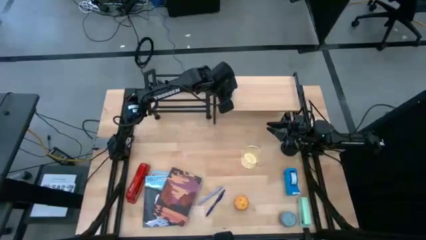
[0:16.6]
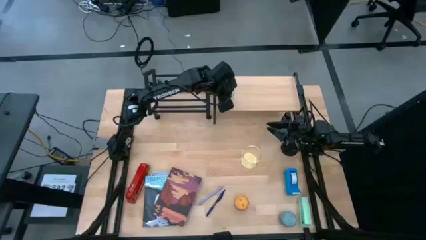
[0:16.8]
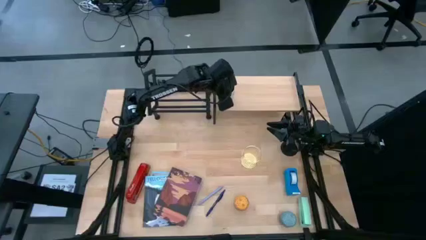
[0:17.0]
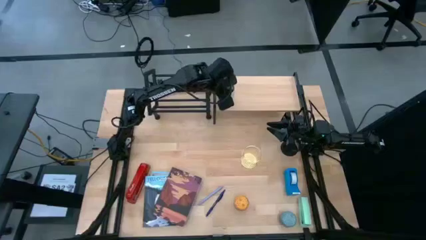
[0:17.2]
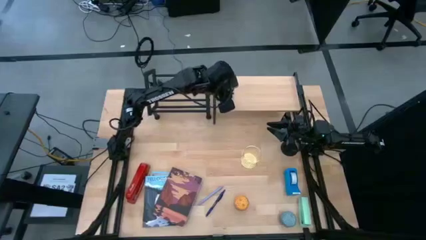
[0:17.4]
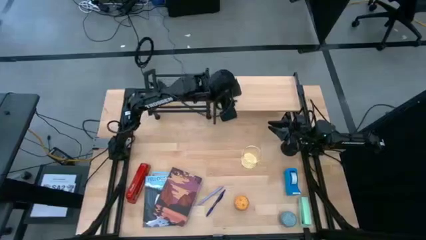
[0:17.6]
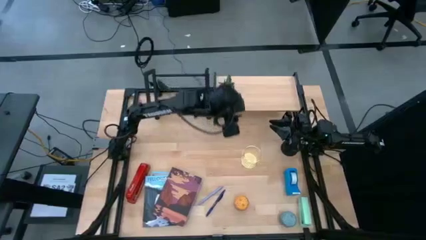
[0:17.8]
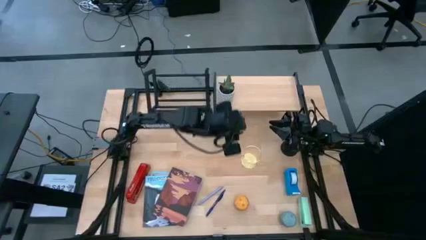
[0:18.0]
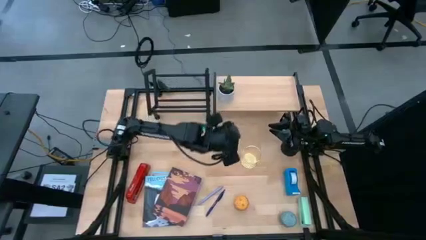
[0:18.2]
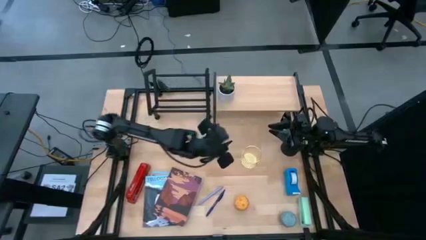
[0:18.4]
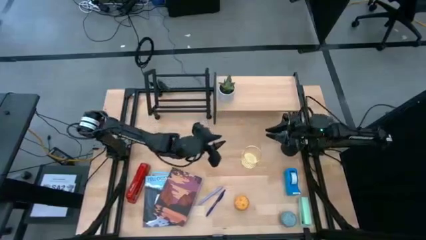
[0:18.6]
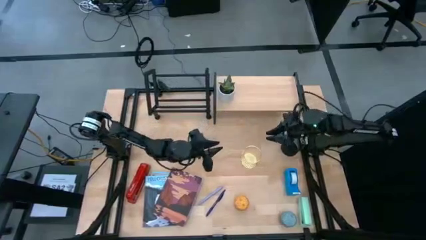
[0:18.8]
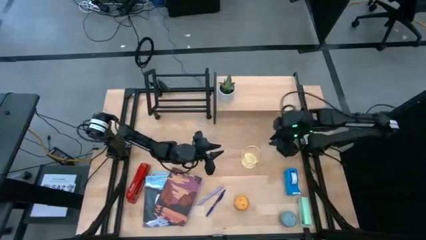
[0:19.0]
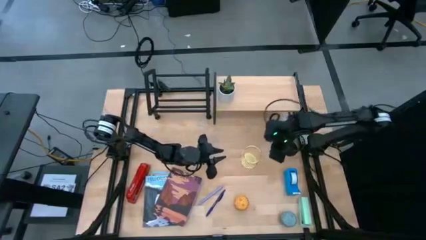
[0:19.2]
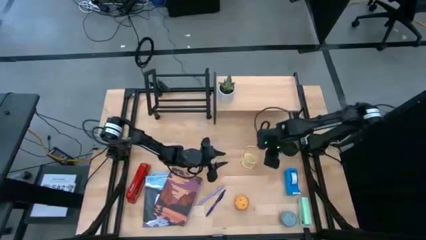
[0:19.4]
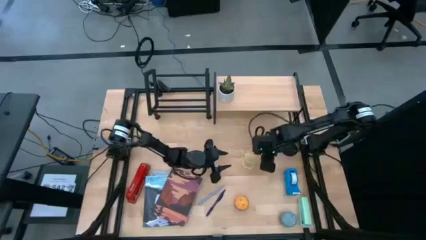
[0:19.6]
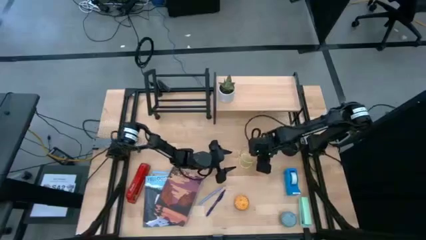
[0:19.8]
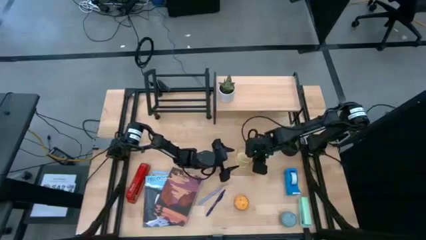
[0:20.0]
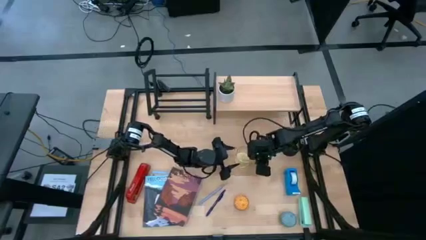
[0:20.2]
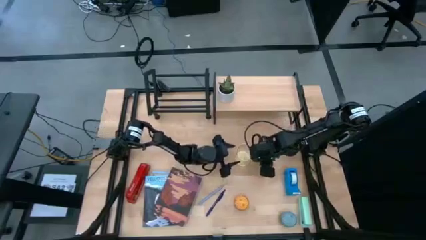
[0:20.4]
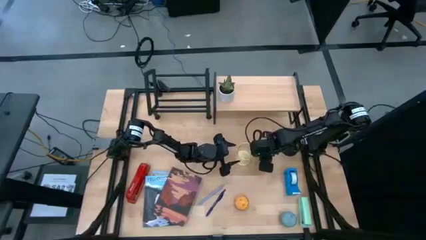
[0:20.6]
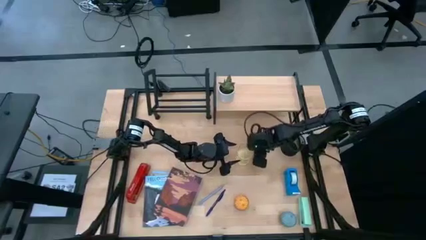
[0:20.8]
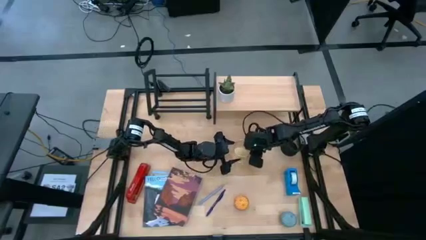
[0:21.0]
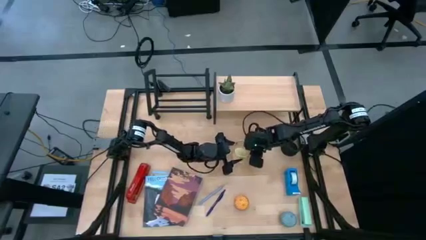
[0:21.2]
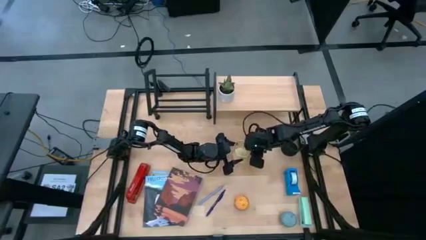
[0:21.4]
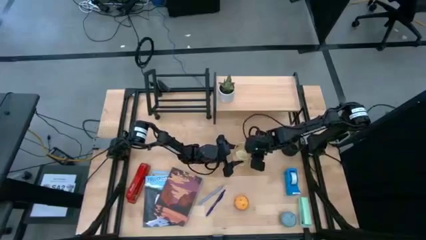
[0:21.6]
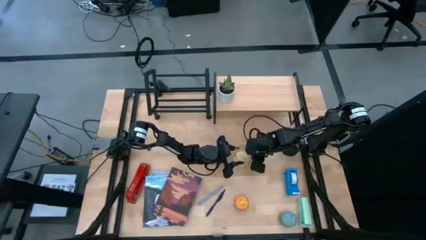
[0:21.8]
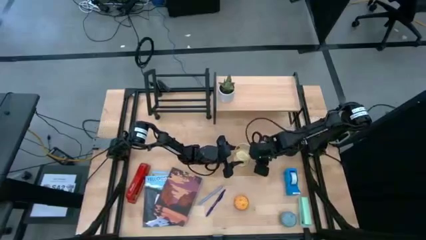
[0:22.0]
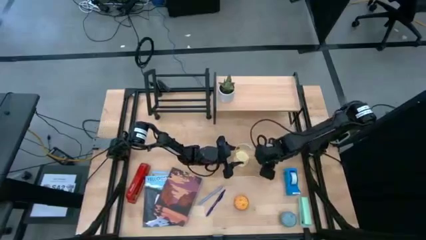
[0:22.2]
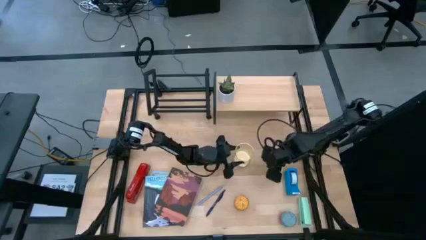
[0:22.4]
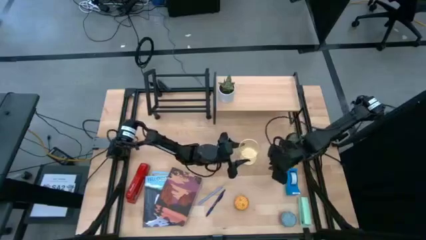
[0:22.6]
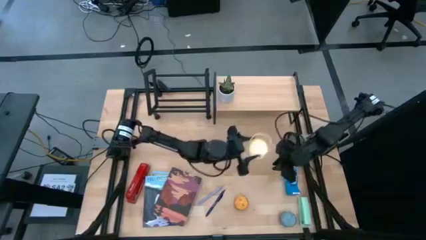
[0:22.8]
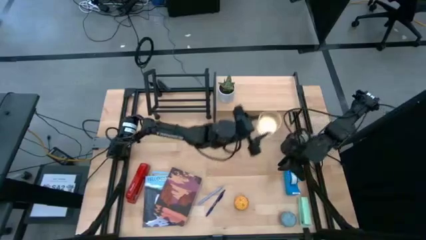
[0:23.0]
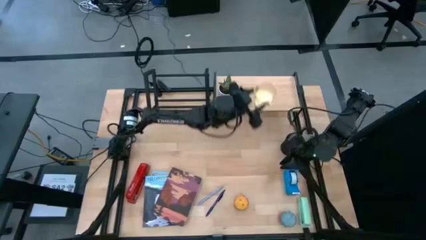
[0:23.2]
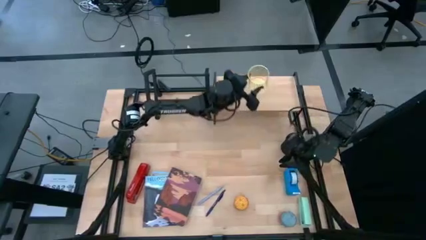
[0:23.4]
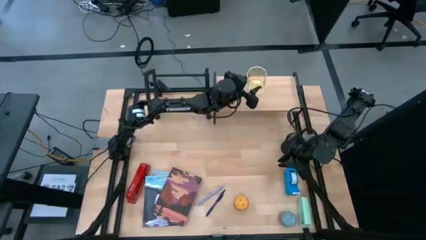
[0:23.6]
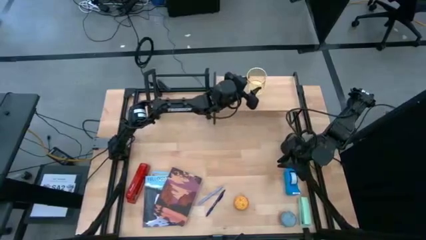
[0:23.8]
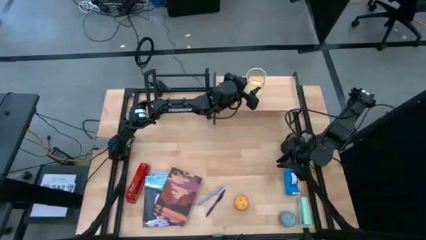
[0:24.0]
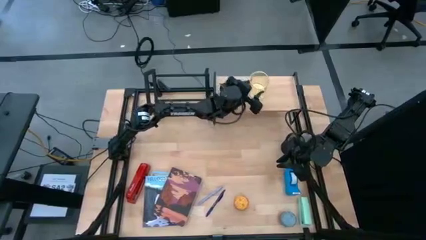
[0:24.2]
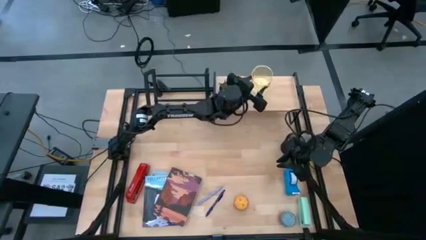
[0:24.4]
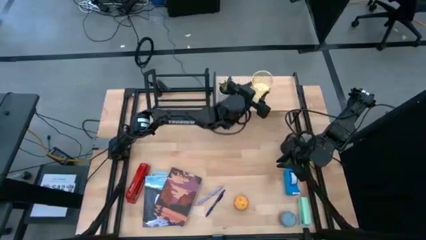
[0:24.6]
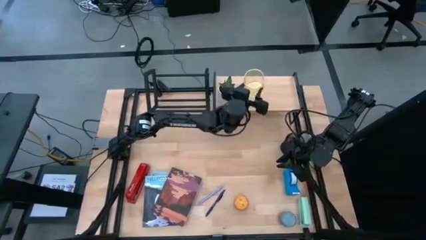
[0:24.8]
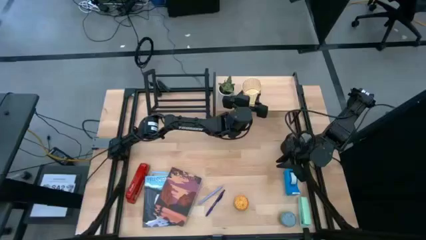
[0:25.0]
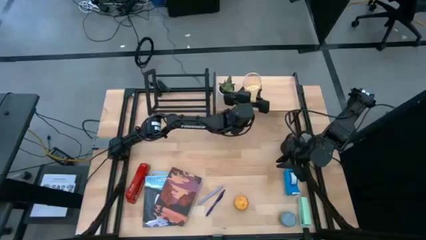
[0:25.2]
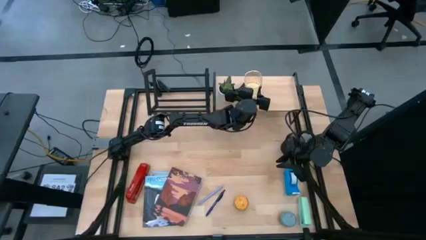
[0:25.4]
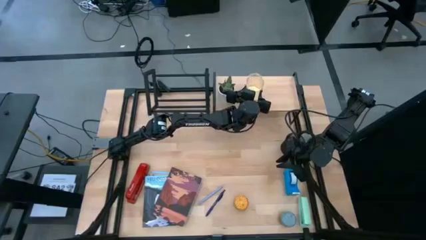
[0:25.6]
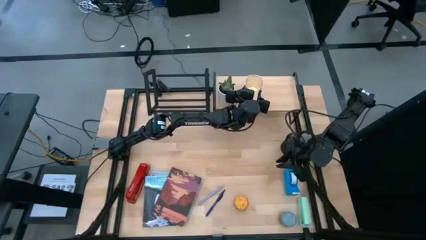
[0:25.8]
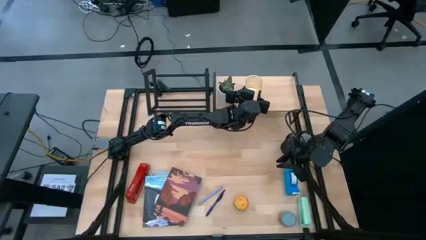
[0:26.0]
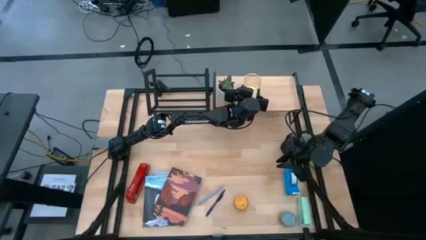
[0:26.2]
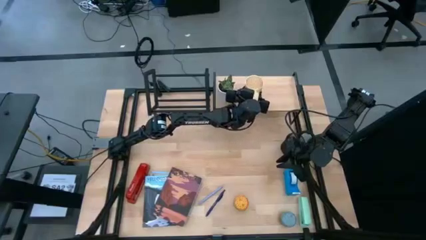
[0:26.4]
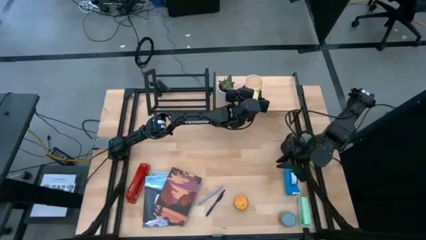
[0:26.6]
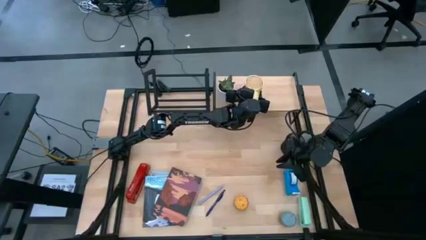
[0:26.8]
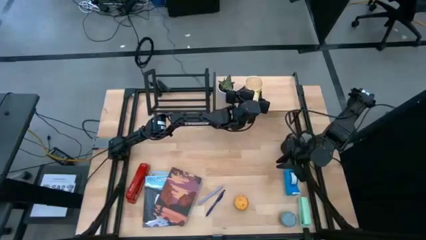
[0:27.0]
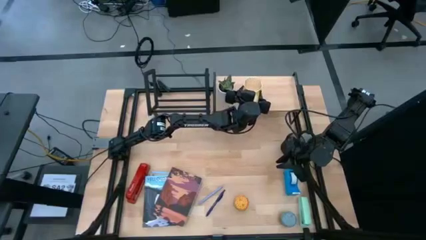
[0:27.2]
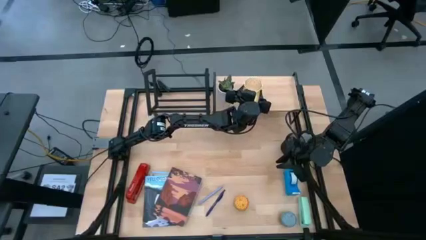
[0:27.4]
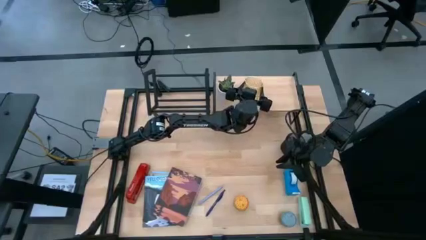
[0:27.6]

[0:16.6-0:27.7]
Task: Stock shelves
Put the yellow pen organizer on the shelf

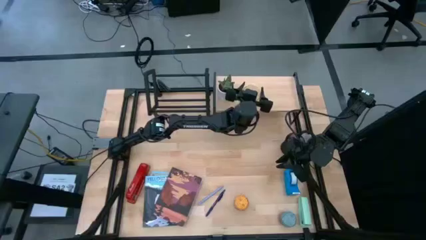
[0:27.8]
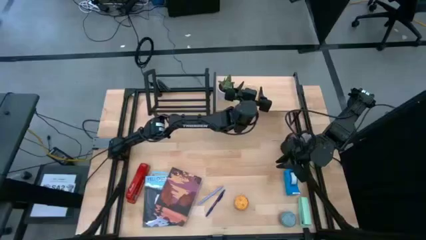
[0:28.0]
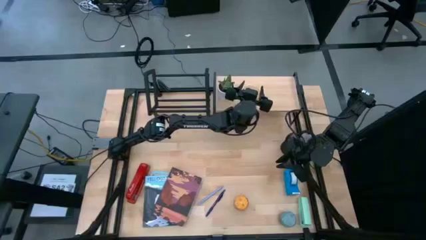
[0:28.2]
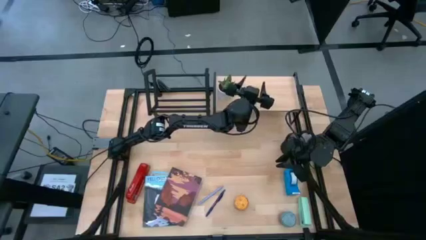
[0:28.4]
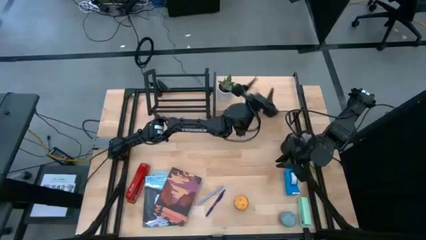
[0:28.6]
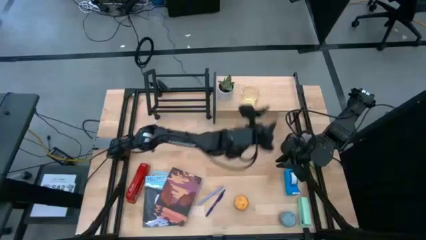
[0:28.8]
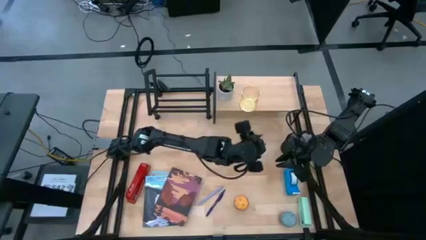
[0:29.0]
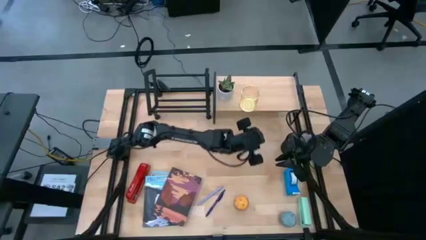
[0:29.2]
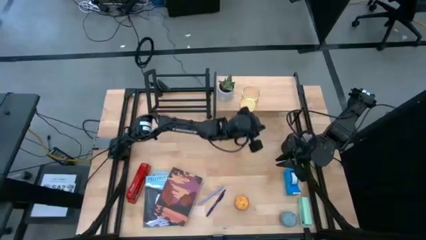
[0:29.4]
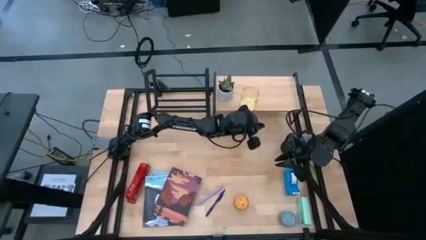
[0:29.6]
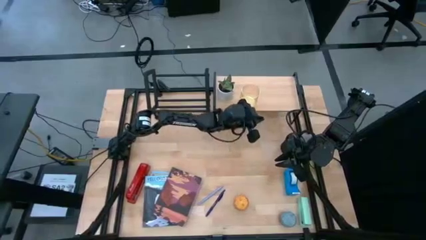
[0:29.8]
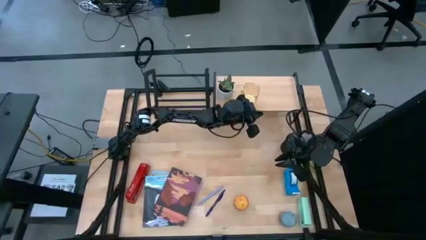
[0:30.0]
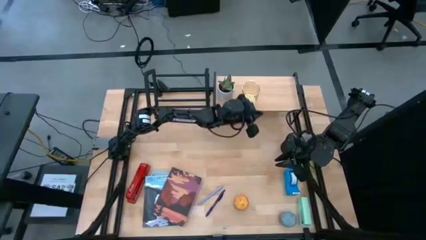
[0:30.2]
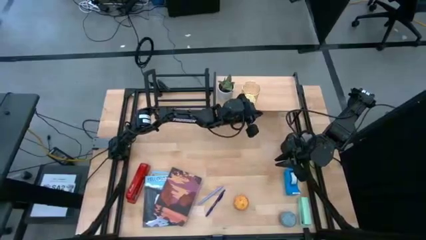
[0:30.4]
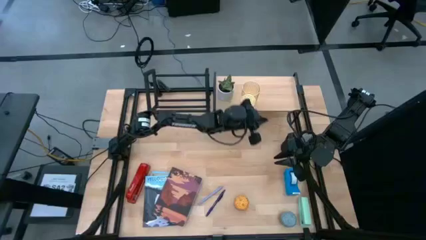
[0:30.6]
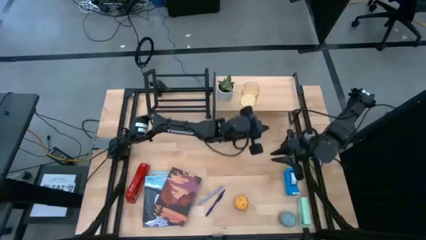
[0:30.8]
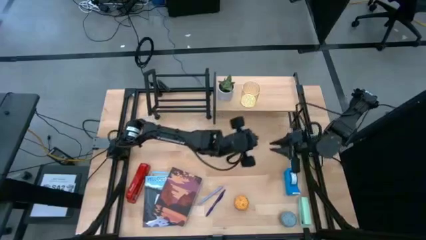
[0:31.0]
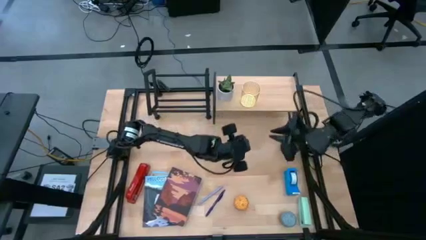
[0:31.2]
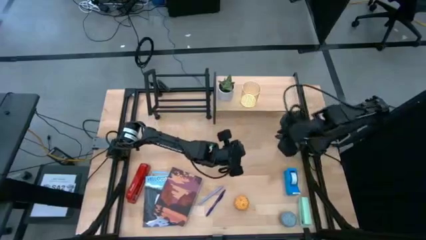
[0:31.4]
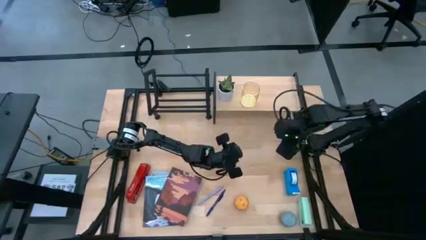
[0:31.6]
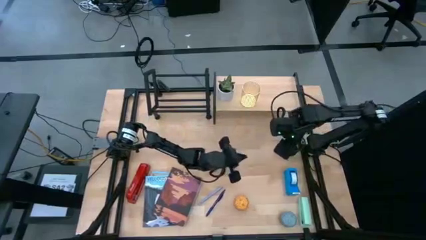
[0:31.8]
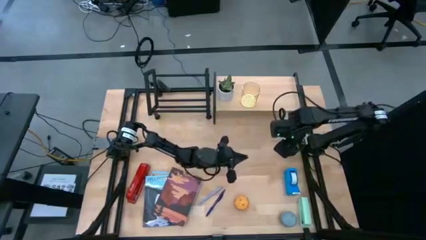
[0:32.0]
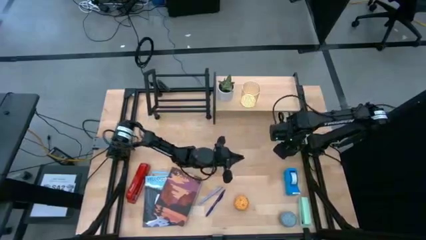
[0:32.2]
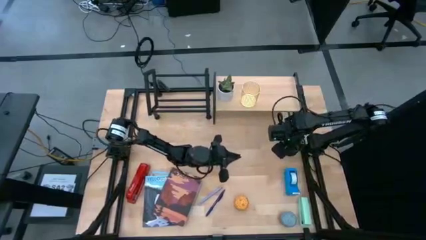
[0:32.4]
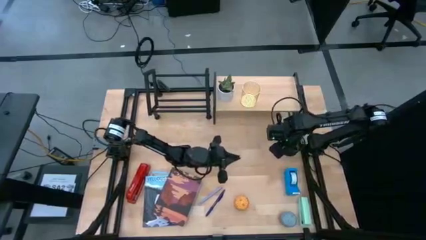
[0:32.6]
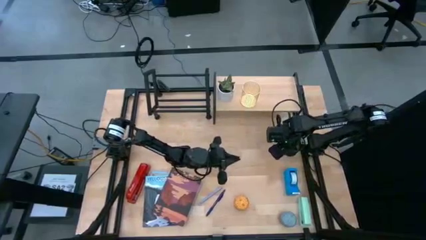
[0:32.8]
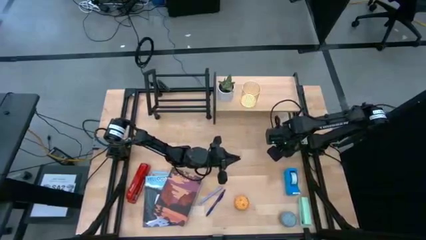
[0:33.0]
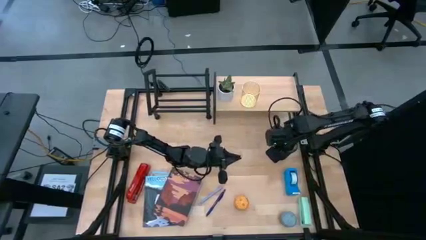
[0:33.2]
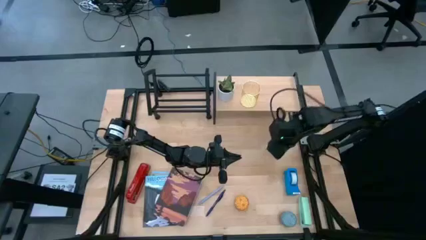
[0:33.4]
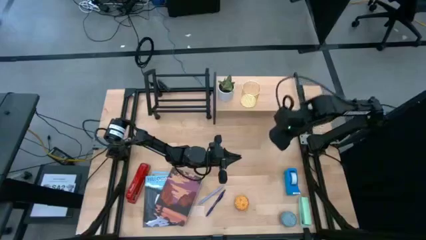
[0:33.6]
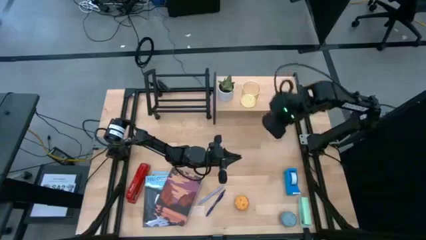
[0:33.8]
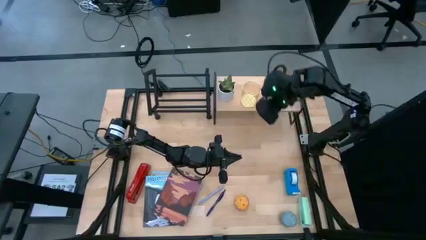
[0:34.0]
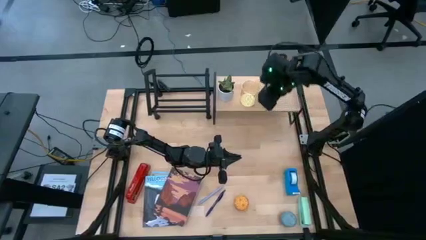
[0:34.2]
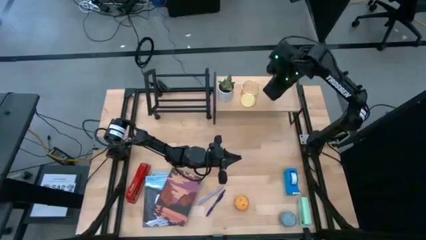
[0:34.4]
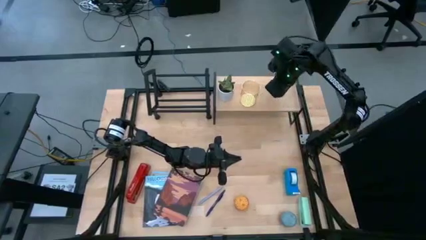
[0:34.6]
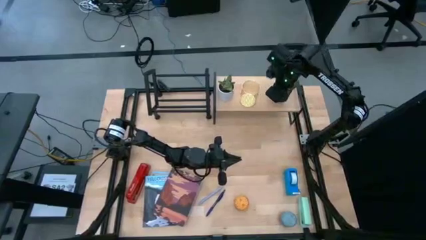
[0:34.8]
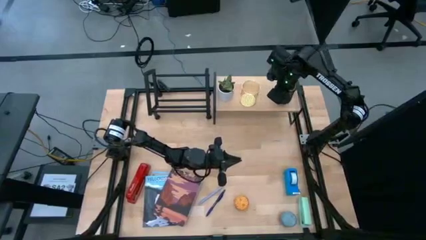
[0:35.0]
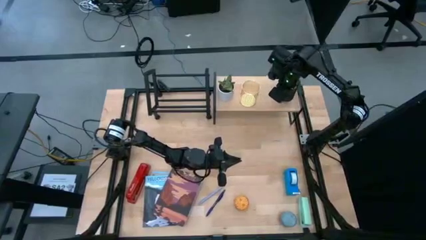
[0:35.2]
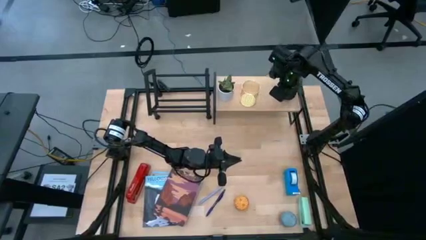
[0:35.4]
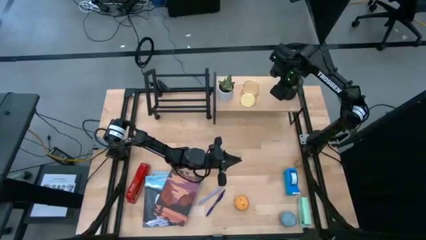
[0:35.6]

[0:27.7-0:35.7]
Put the black pen organizer on the shelf
